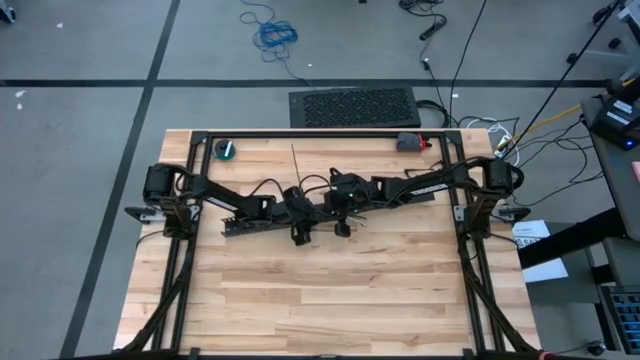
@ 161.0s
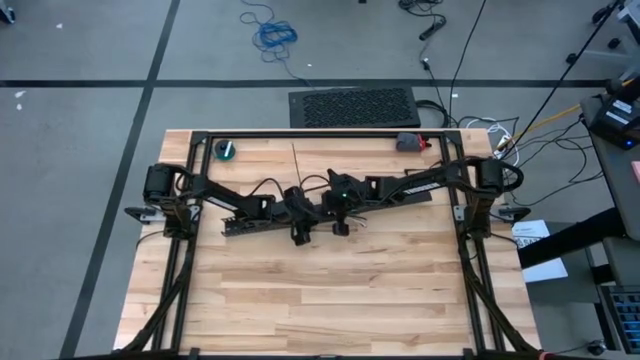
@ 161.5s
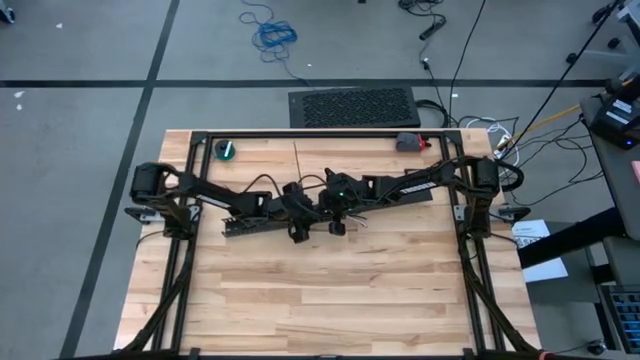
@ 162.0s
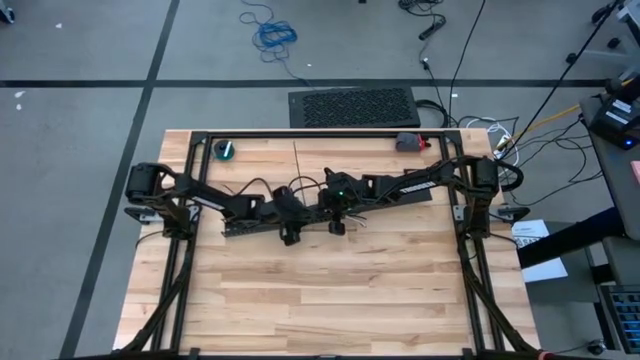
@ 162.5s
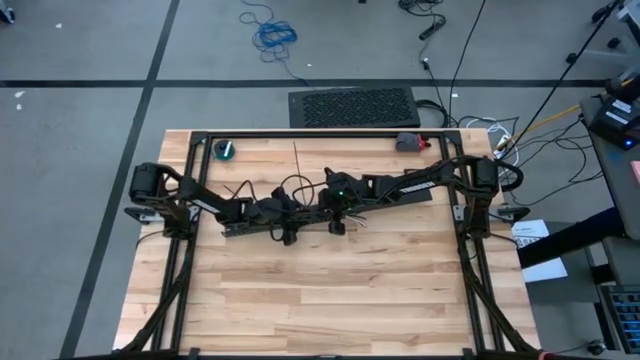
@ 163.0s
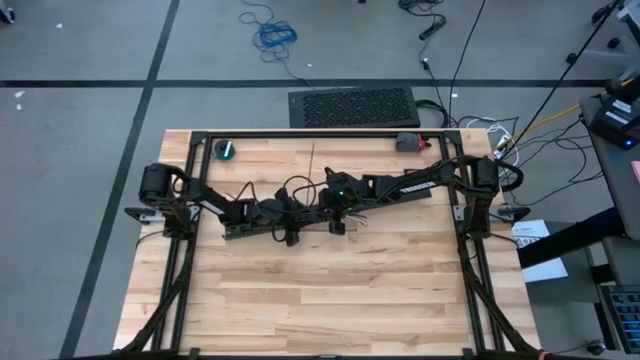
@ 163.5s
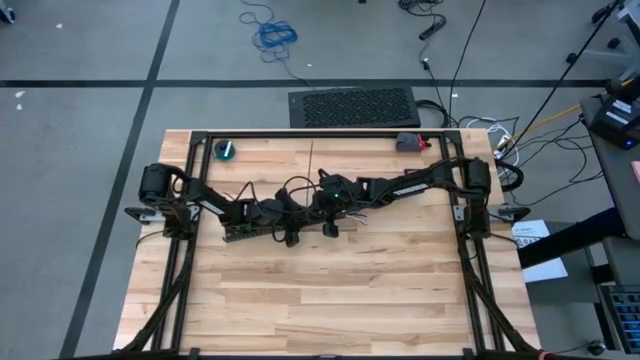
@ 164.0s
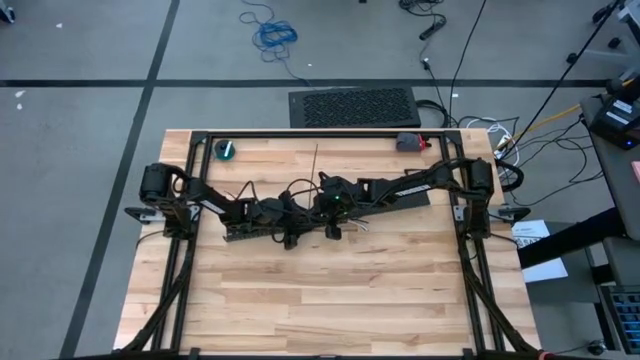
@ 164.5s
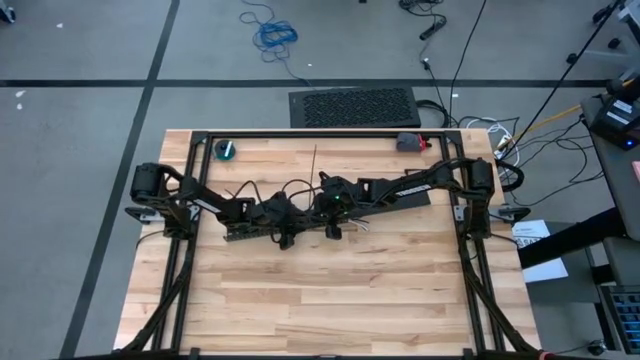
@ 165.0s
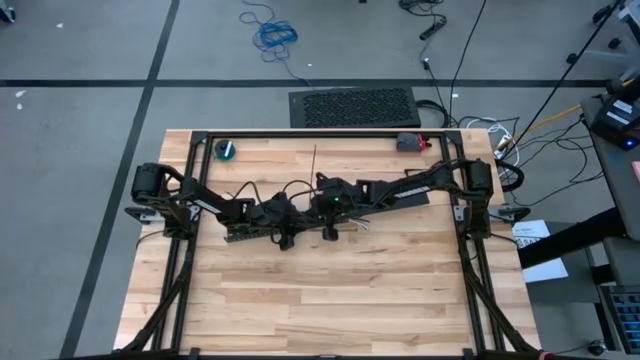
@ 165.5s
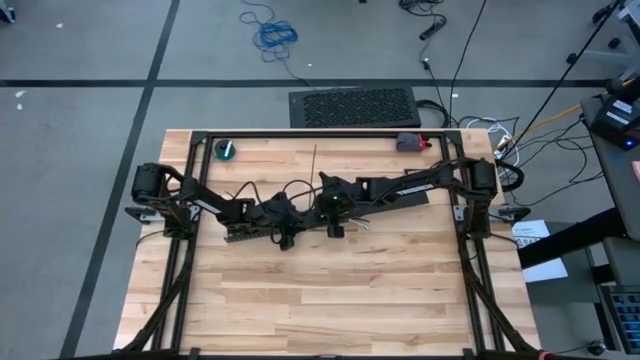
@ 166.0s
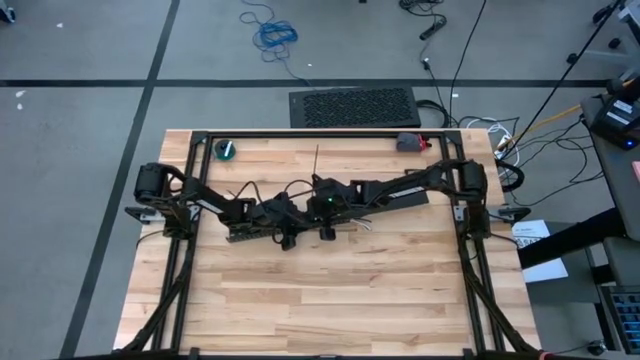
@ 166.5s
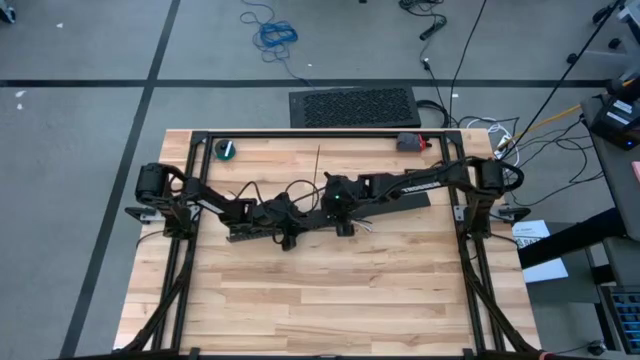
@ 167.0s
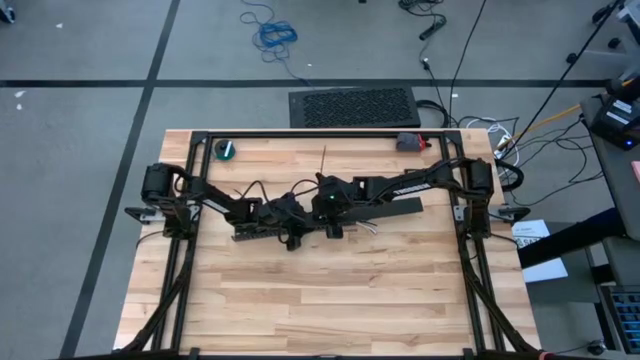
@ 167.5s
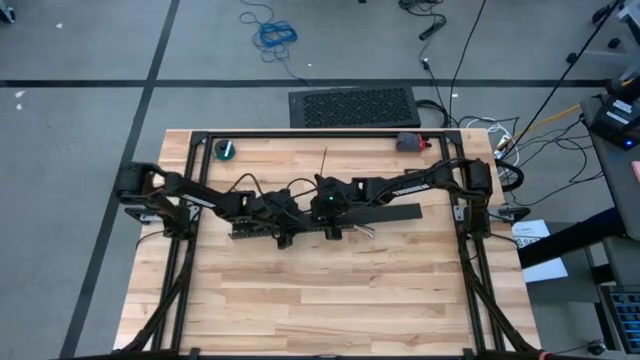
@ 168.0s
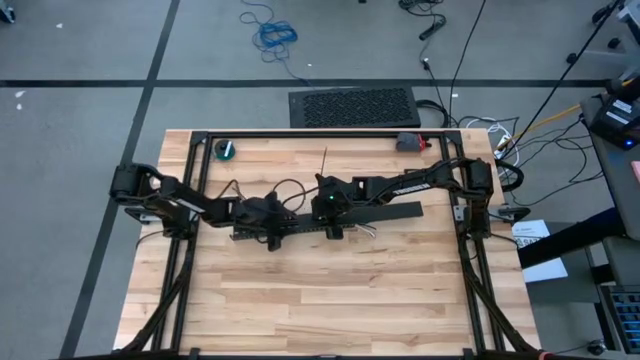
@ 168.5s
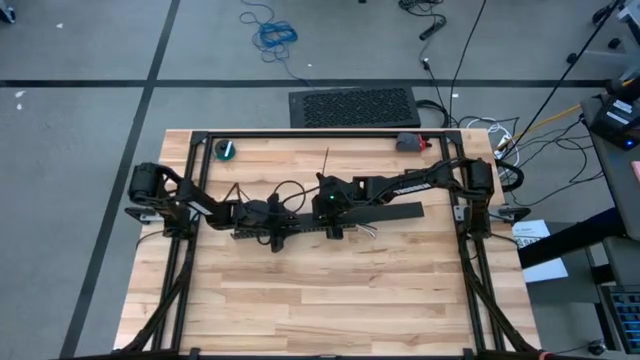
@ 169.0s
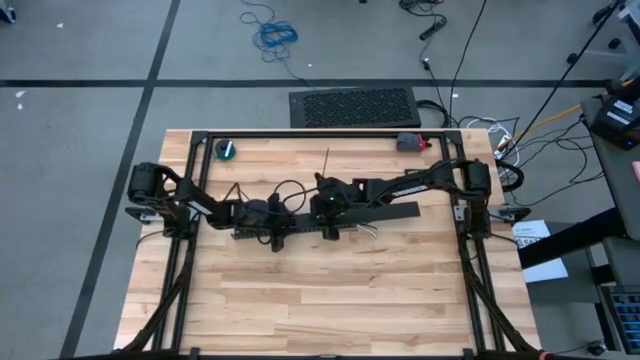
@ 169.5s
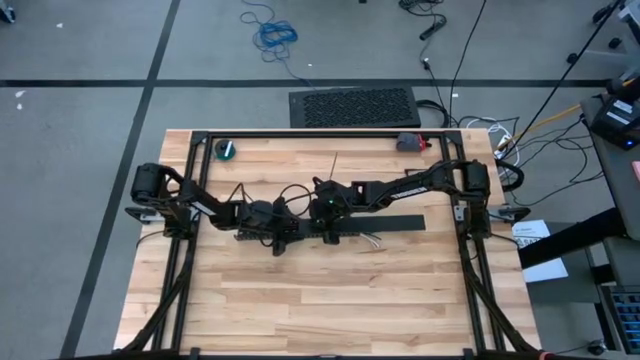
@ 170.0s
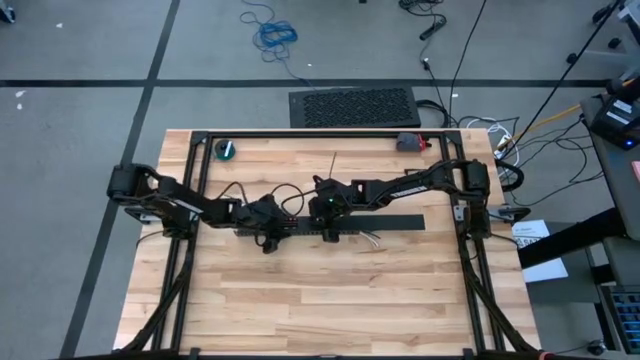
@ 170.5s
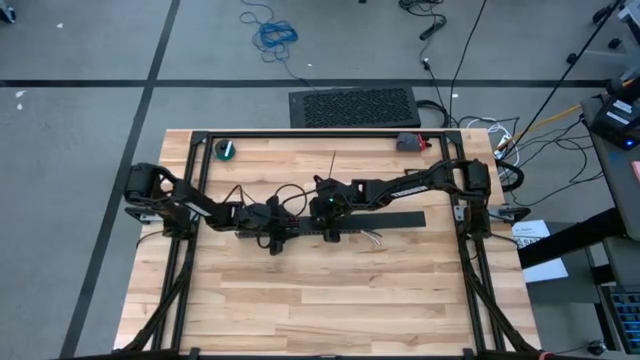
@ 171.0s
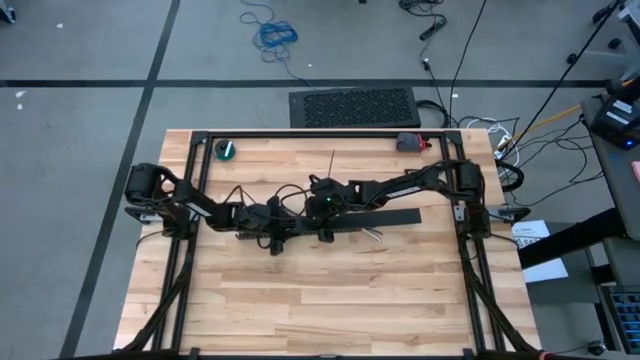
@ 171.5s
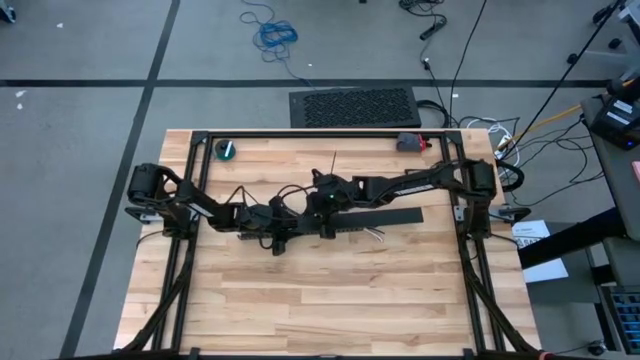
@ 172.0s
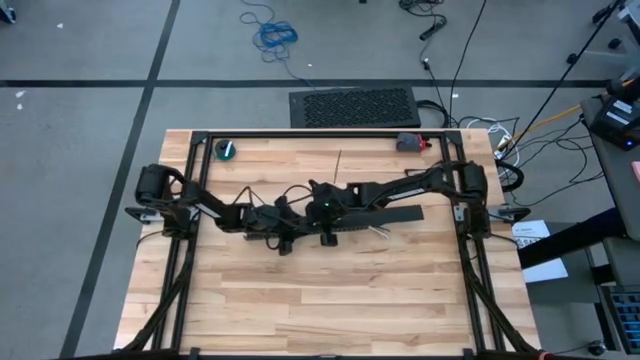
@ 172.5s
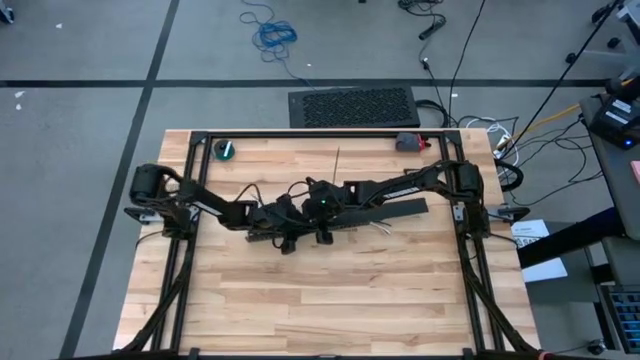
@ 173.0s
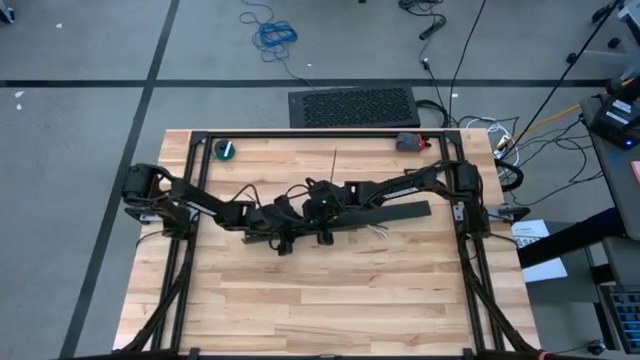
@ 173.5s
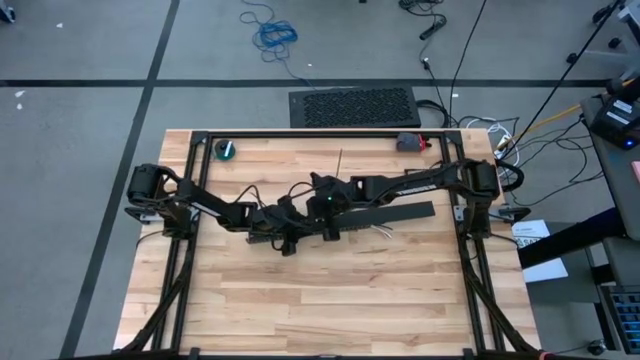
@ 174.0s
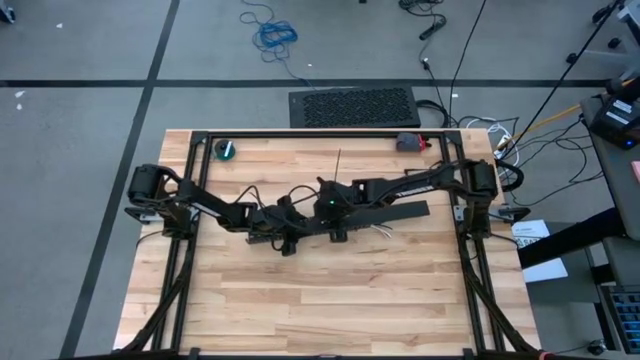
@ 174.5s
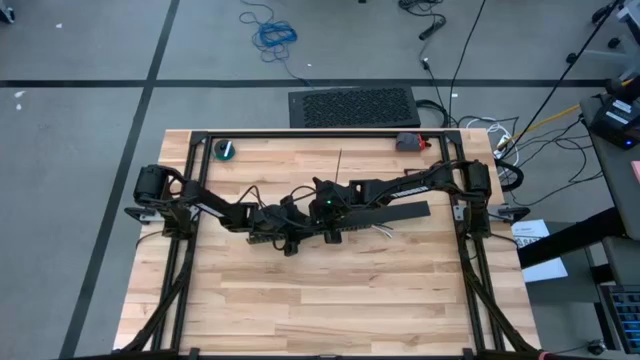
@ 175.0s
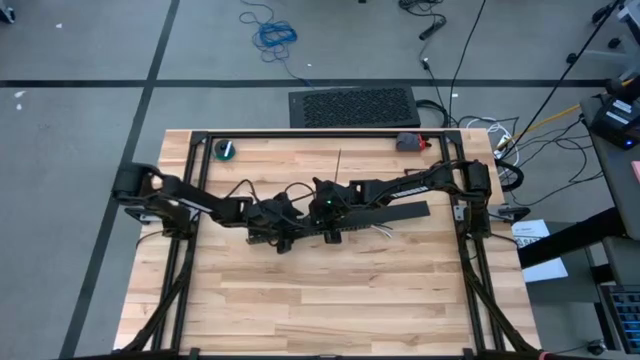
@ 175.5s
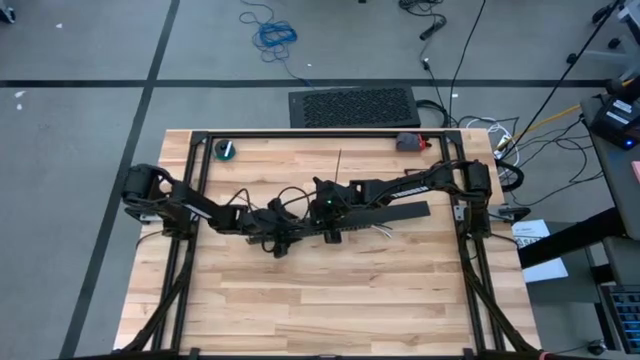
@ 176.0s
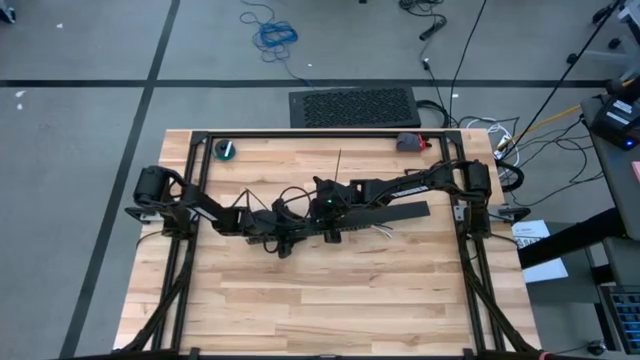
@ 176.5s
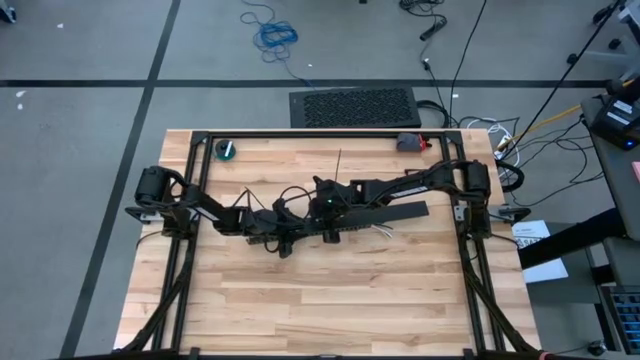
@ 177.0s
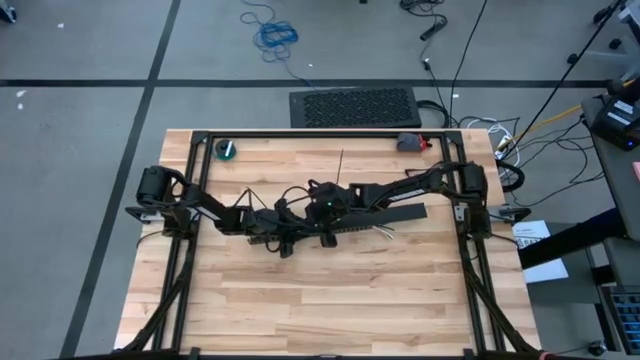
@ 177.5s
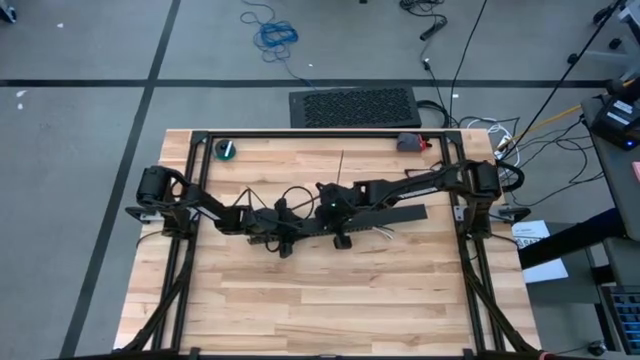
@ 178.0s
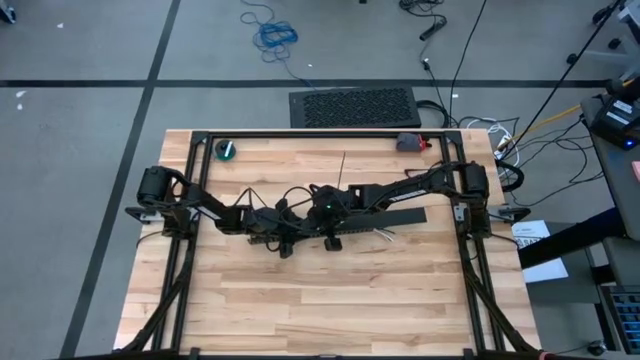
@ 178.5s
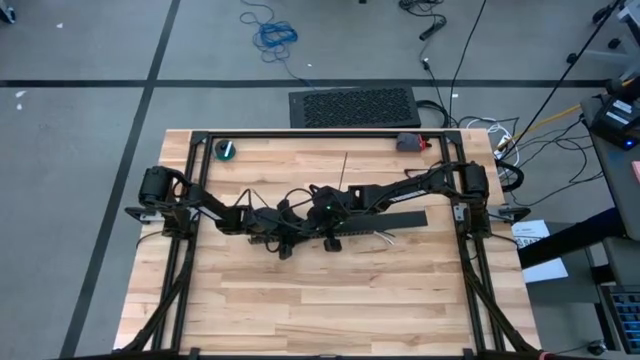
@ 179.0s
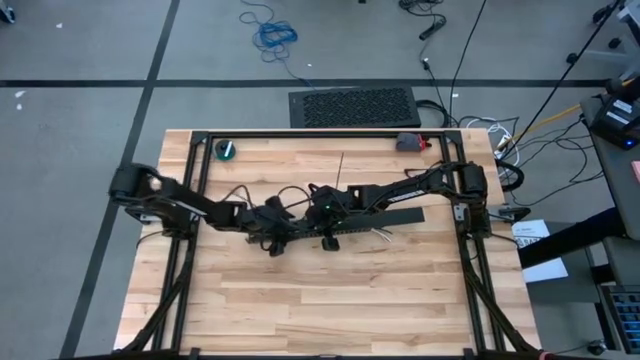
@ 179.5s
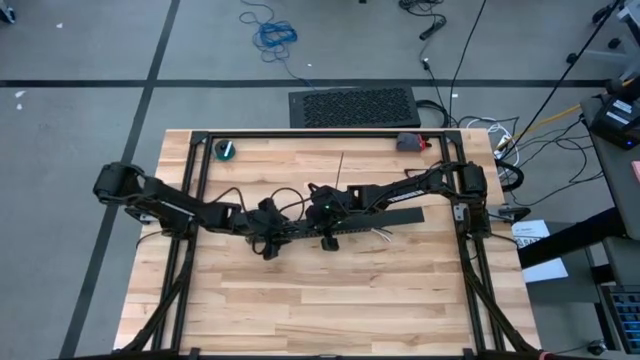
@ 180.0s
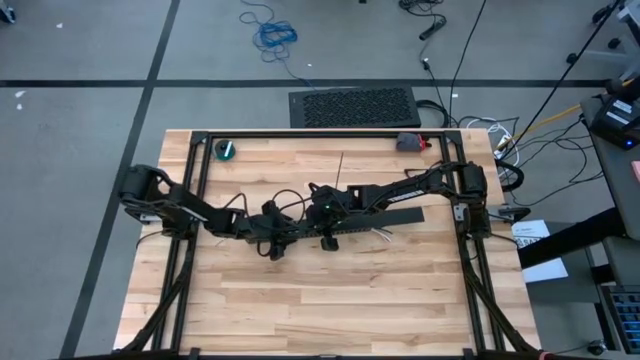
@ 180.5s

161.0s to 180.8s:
Task: Ziptie cables
Insert the cable duct cover
